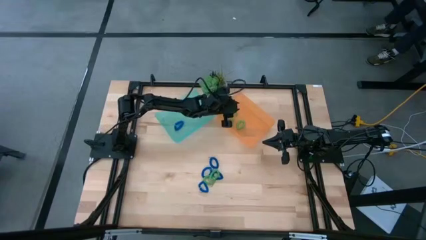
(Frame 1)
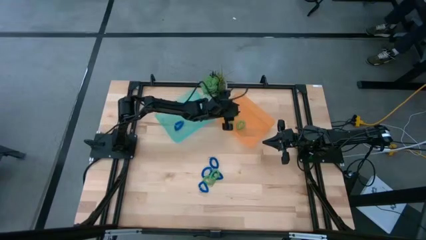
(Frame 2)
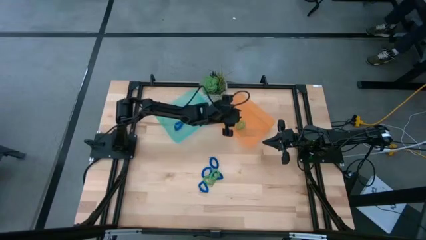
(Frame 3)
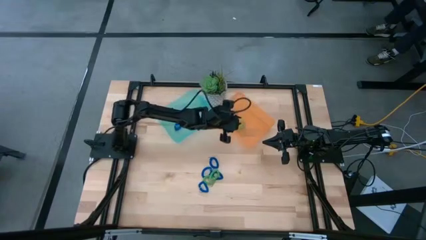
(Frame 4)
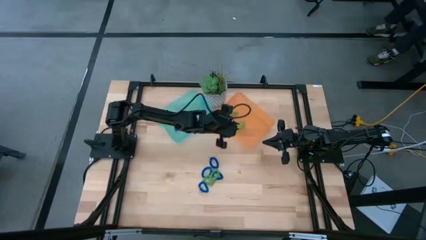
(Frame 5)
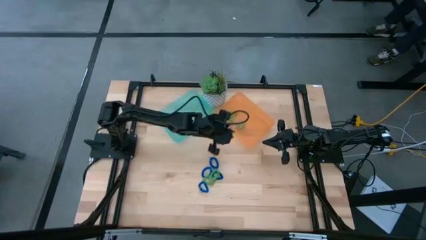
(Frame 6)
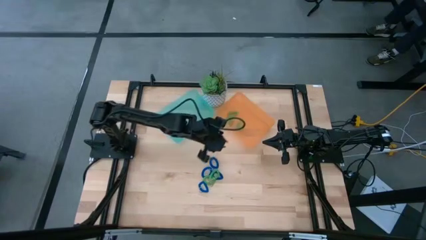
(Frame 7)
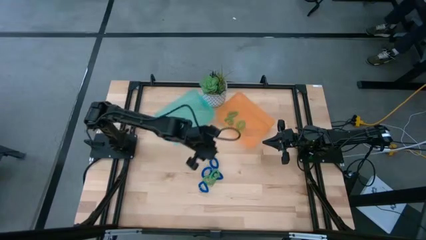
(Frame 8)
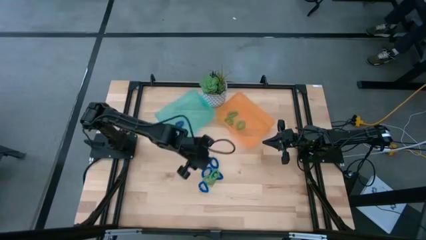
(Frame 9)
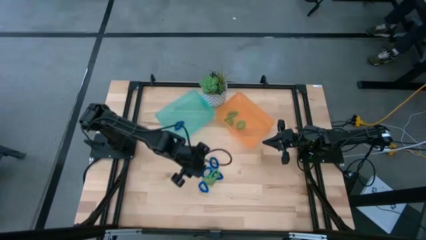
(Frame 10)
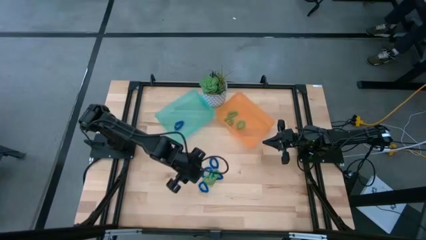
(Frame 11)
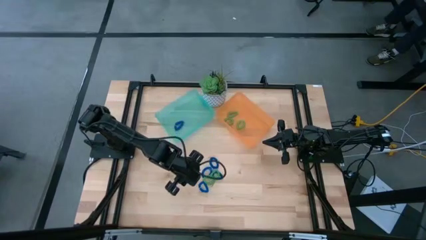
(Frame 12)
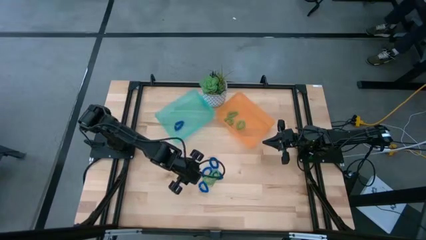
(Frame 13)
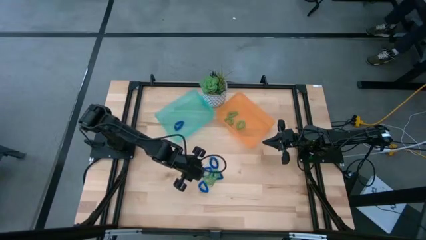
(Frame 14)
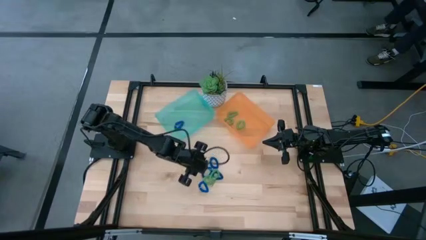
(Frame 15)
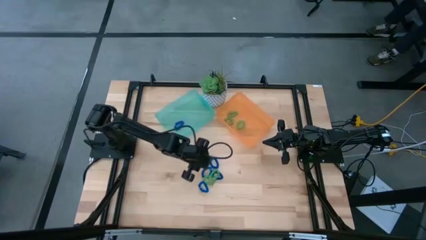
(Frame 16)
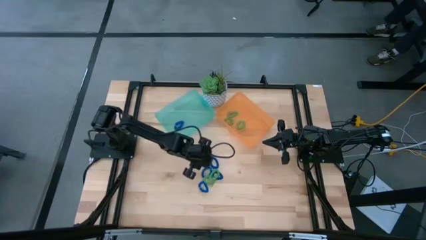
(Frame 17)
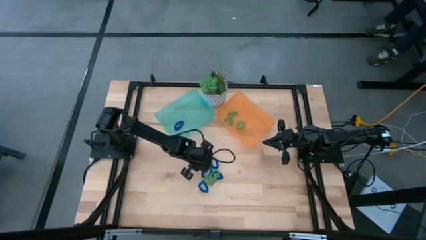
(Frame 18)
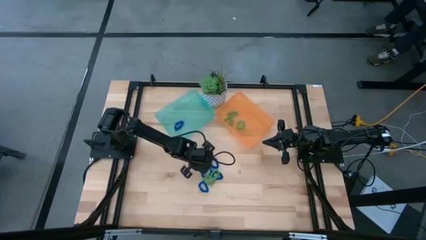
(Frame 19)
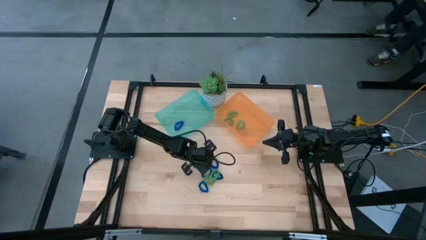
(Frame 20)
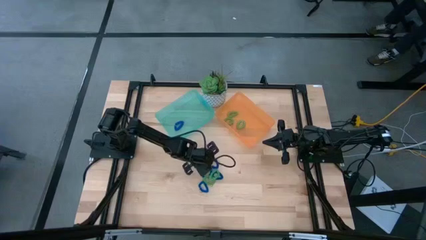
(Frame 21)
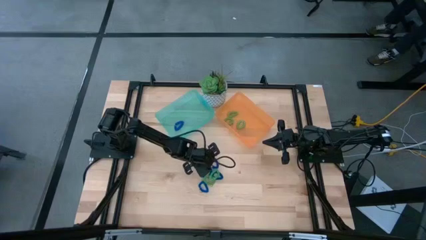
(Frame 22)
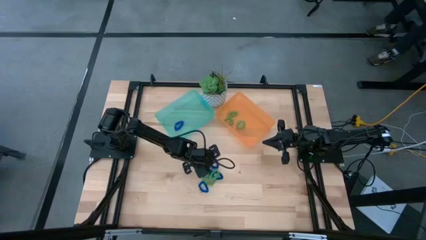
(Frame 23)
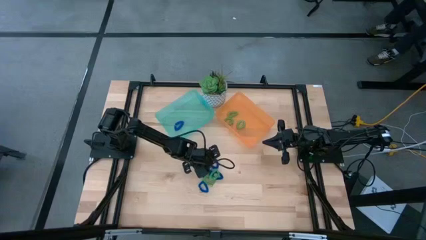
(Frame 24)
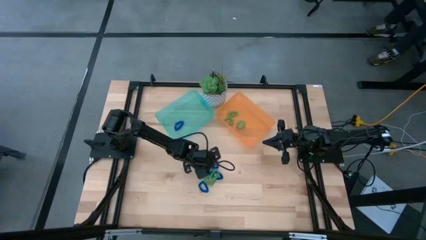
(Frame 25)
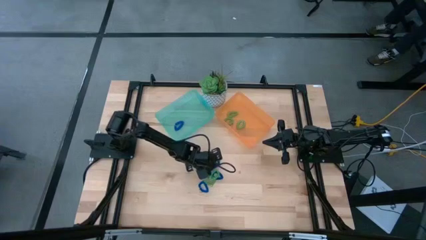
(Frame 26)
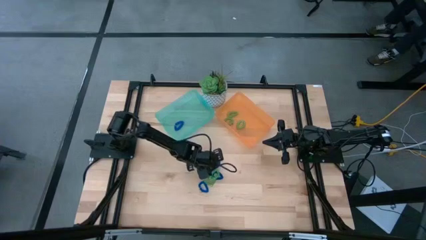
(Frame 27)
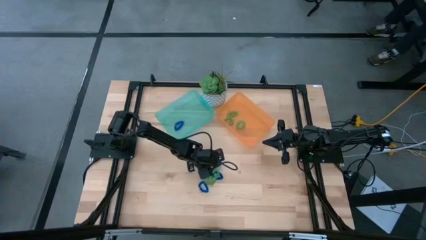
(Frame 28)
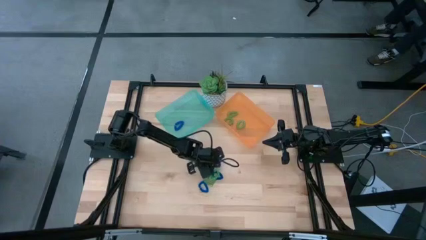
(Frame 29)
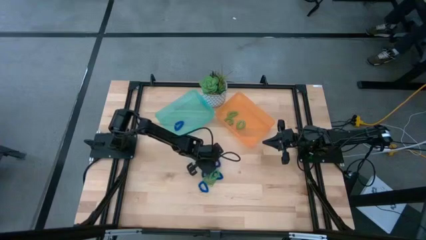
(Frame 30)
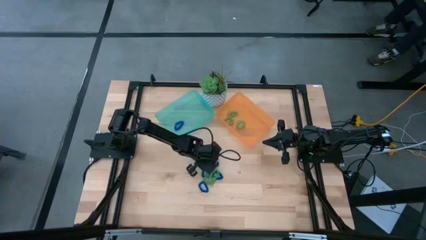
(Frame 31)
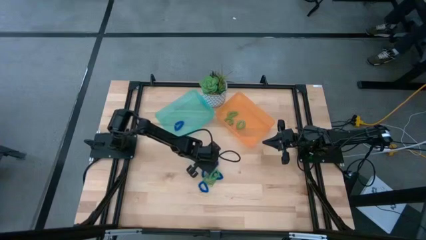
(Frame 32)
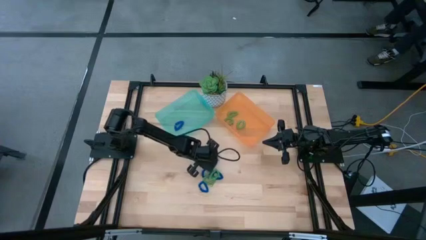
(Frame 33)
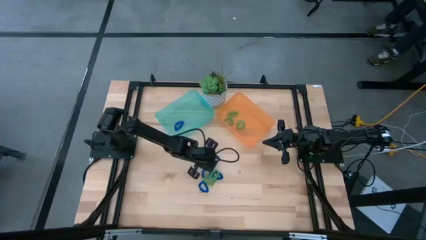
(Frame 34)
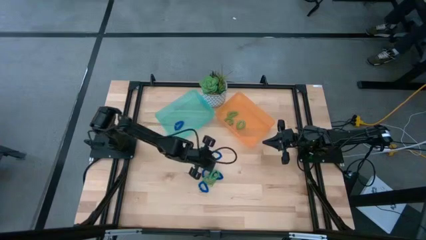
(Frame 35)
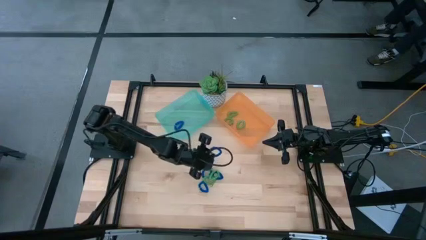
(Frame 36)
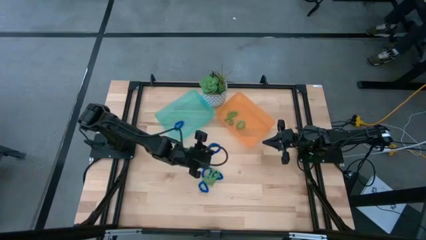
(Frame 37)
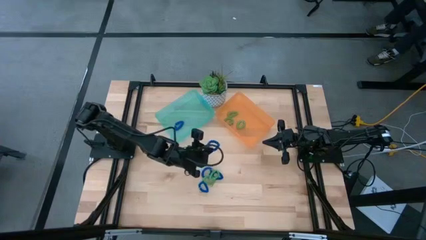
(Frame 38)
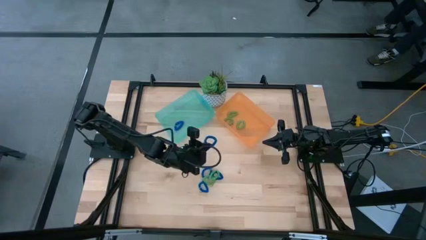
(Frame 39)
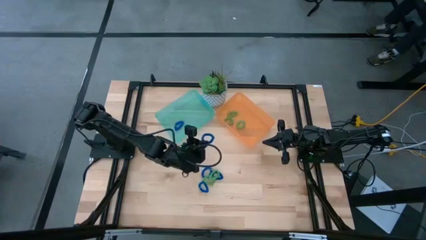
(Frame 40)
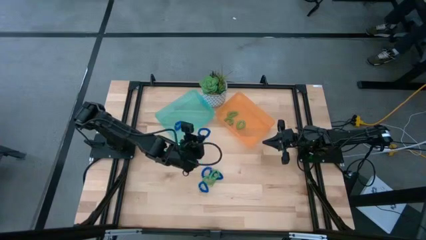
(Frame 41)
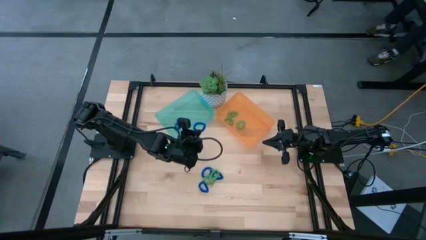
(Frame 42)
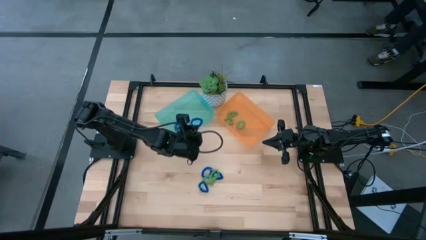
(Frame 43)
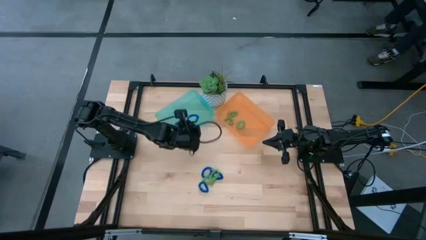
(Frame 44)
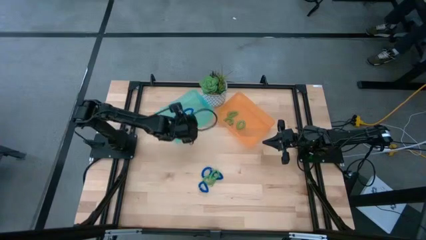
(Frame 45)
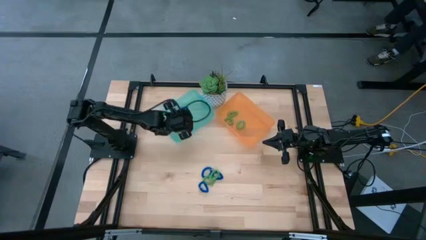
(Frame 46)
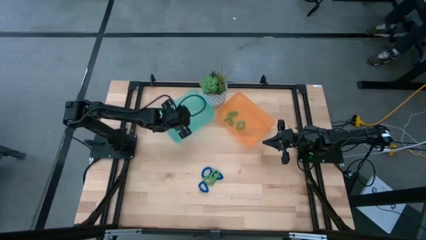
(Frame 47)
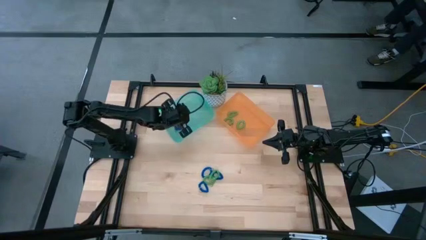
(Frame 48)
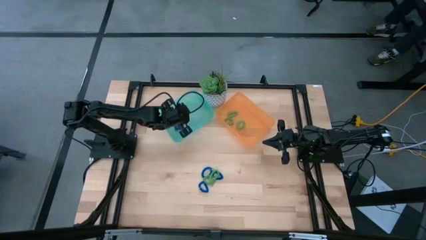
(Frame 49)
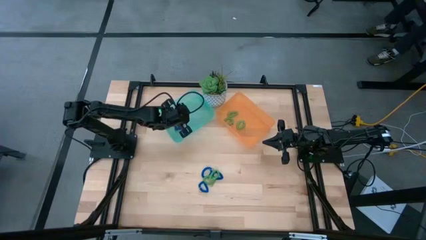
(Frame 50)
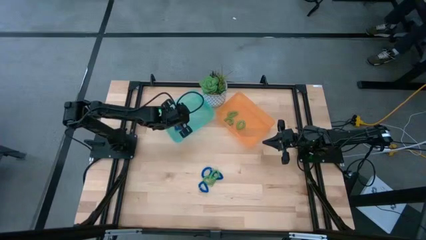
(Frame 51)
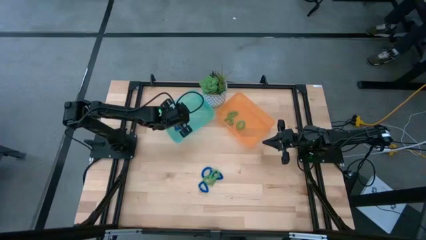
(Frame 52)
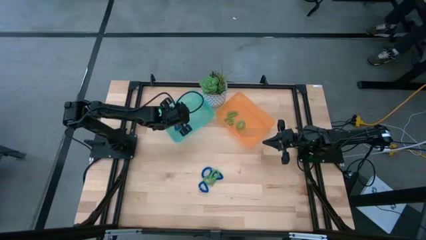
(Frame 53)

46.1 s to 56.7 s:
Task: Sort spring keychains
Put the blue spring keychain into the green bin

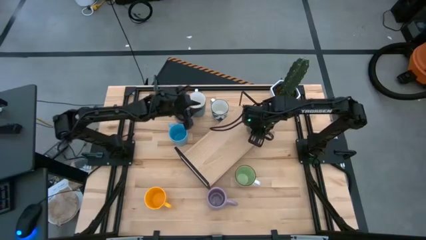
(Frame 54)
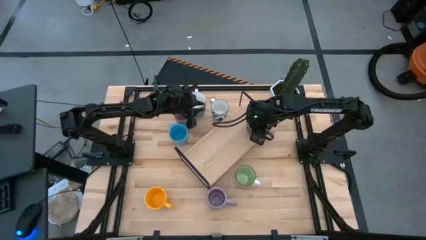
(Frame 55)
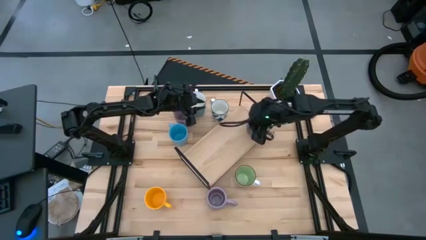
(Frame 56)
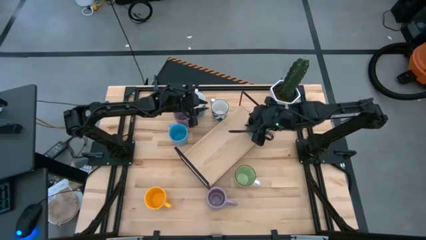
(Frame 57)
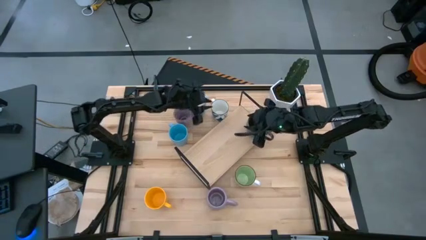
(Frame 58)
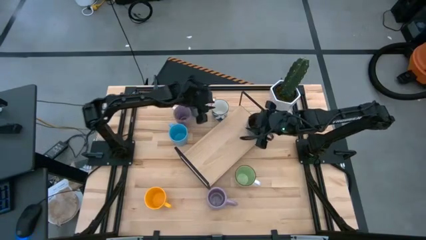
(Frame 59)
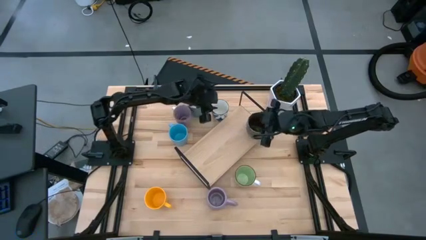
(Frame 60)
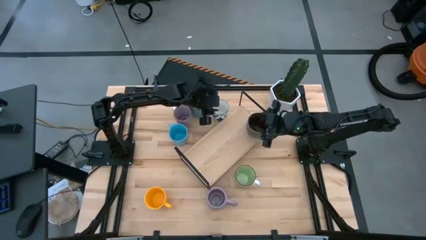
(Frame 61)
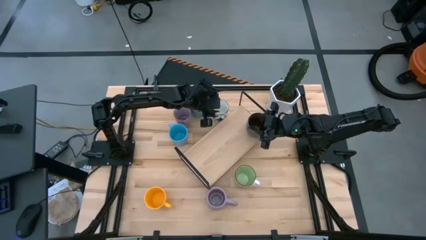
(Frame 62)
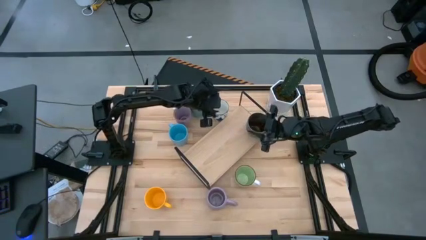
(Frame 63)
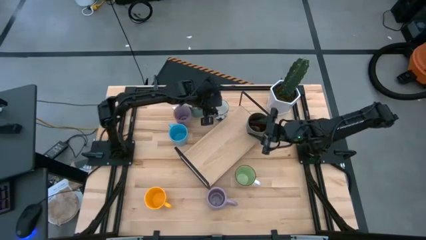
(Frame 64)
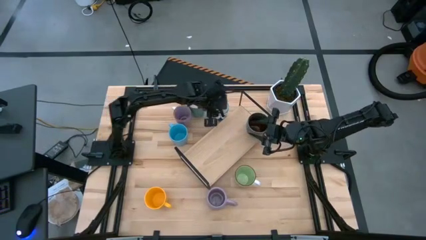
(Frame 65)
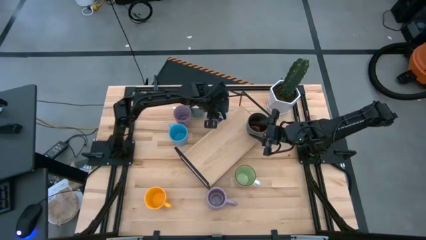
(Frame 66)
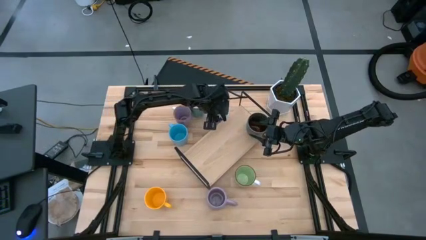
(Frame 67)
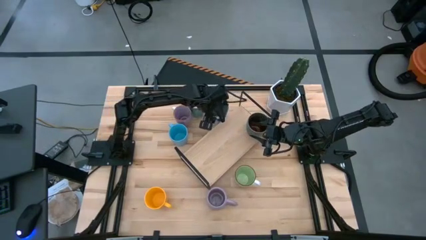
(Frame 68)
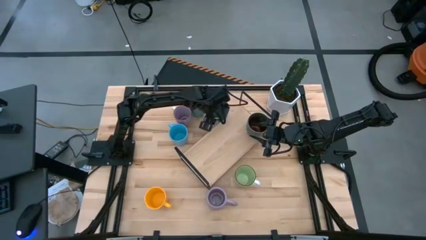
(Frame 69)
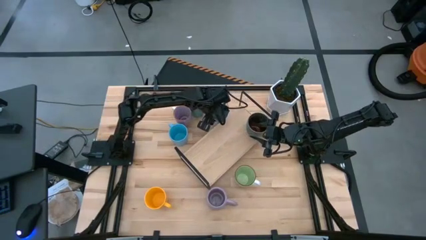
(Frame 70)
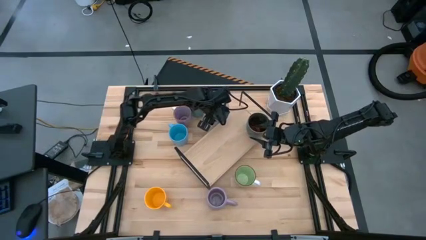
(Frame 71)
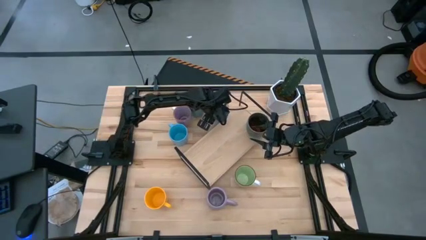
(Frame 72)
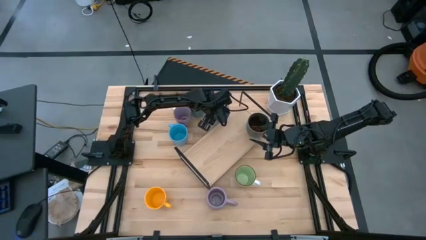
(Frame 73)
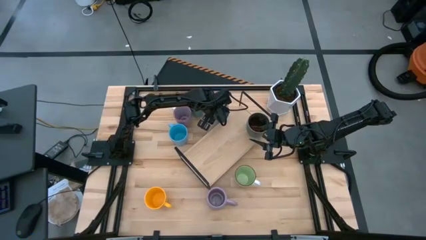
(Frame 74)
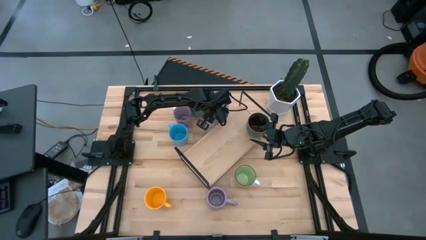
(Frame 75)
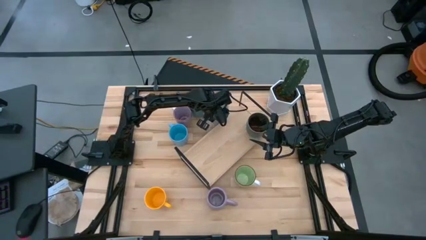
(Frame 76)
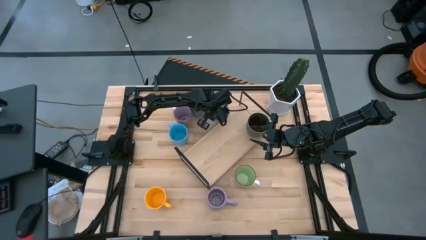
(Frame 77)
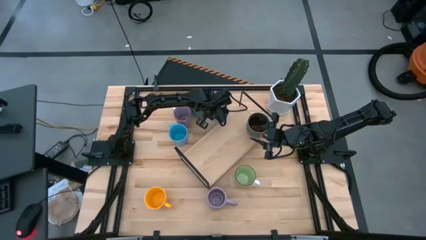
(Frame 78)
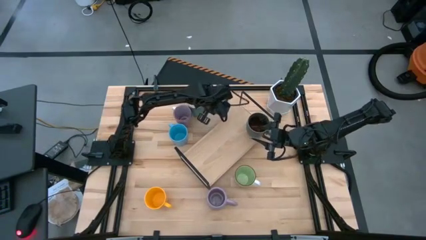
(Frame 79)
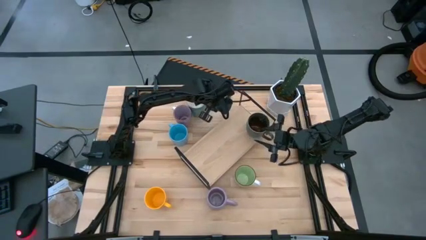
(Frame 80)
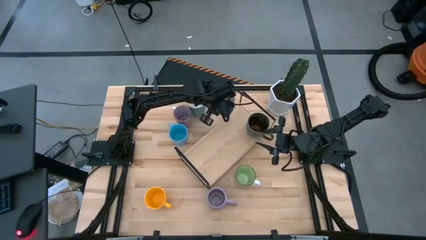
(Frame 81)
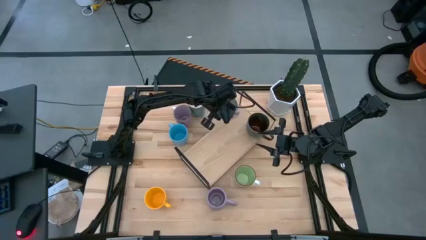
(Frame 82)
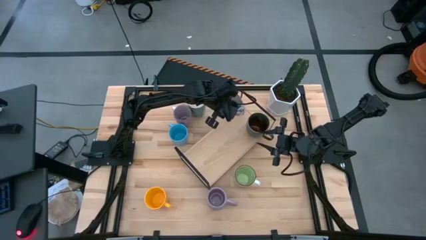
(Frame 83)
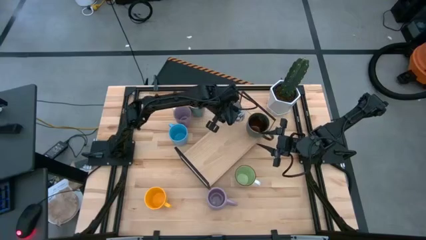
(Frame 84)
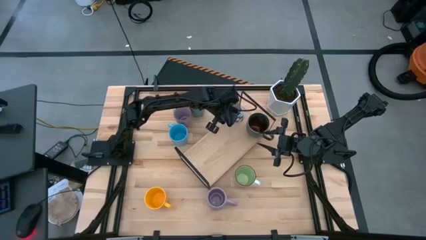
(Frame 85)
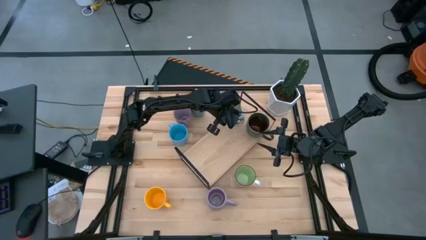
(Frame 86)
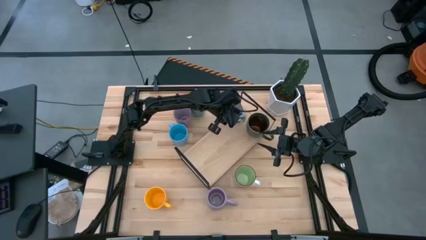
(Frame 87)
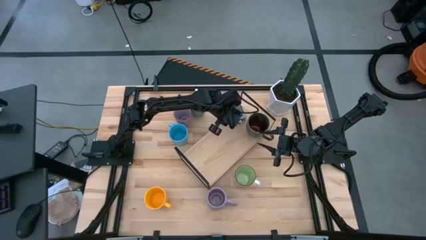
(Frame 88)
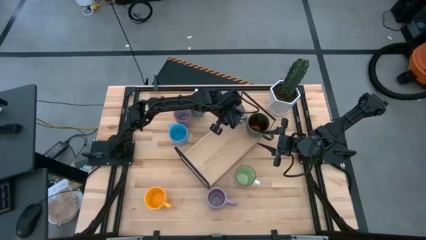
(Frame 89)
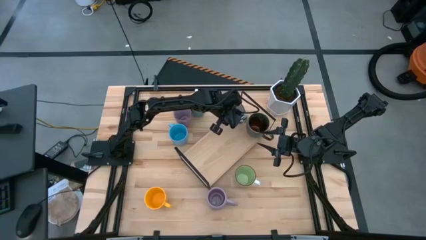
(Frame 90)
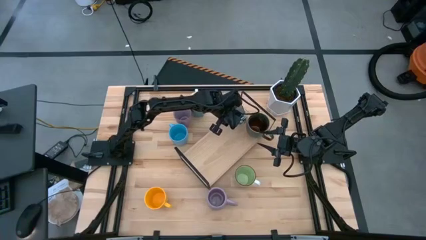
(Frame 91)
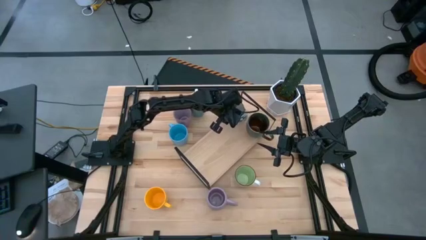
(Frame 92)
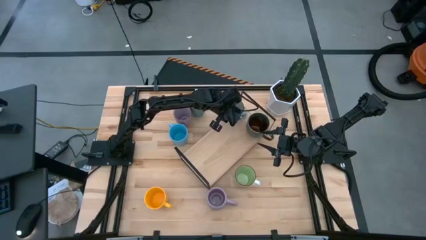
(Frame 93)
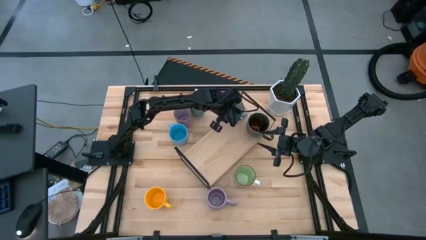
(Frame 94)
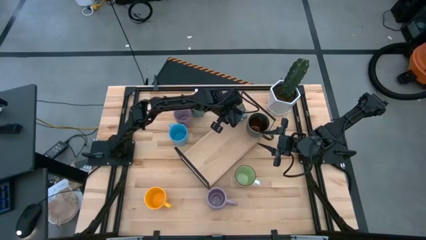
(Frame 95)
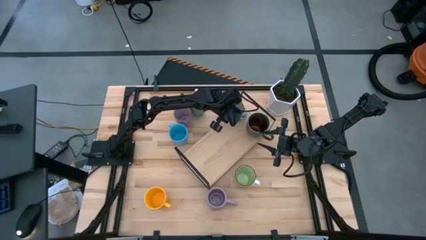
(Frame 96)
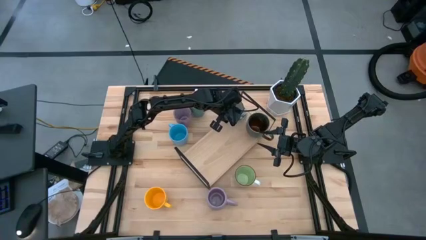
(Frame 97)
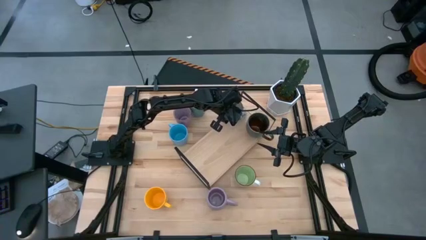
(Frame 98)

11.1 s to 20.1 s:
Task: Place coffee mugs
Put the blue patterned mug on the shelf
